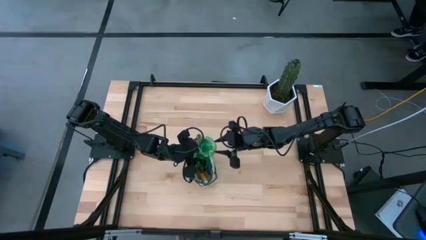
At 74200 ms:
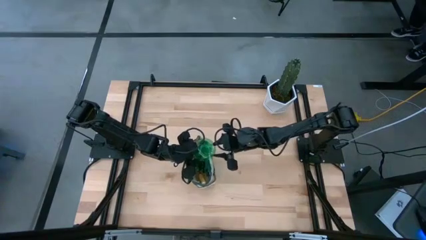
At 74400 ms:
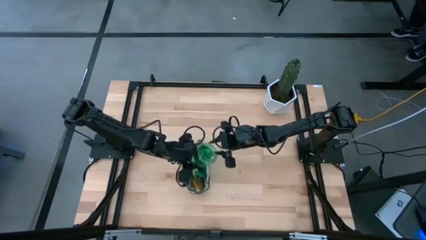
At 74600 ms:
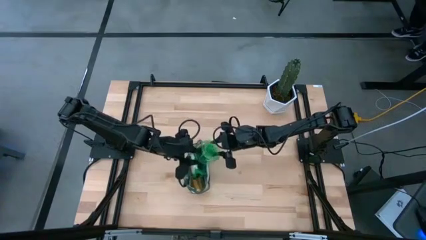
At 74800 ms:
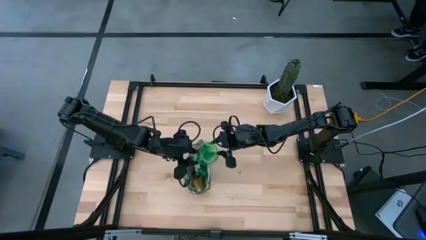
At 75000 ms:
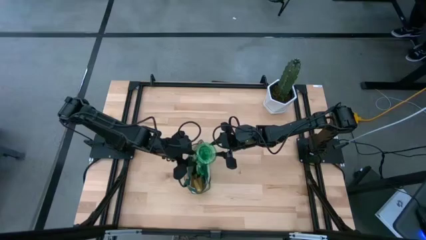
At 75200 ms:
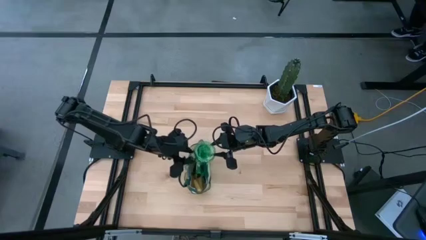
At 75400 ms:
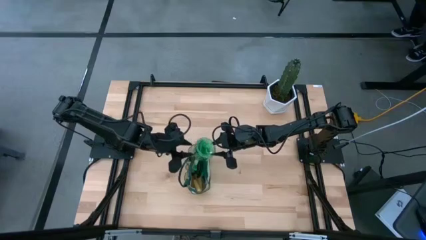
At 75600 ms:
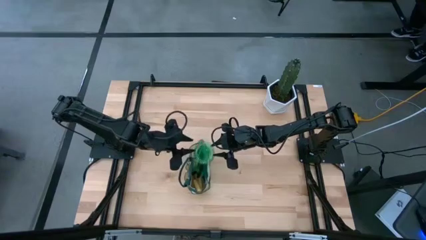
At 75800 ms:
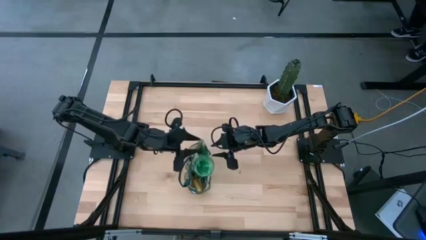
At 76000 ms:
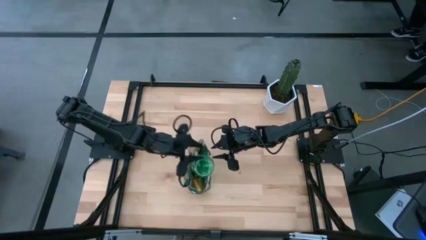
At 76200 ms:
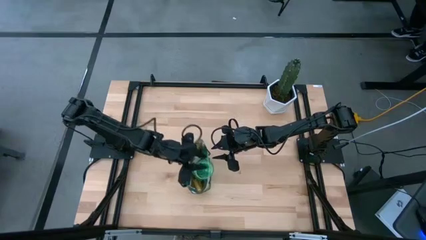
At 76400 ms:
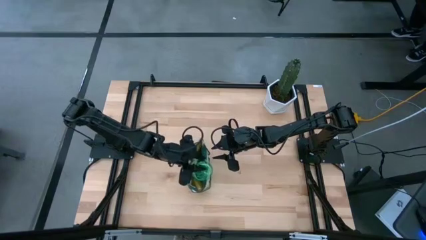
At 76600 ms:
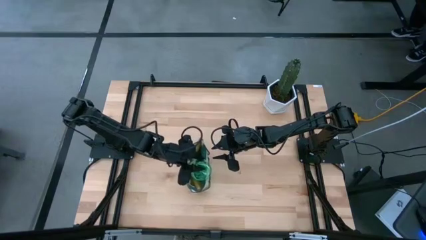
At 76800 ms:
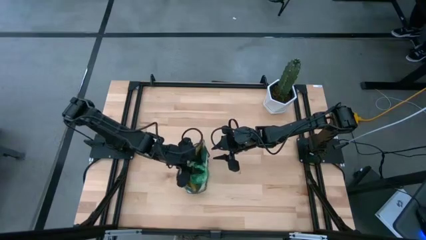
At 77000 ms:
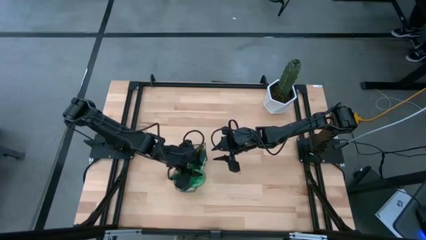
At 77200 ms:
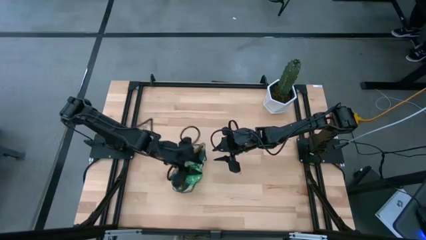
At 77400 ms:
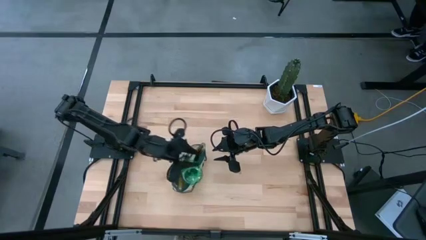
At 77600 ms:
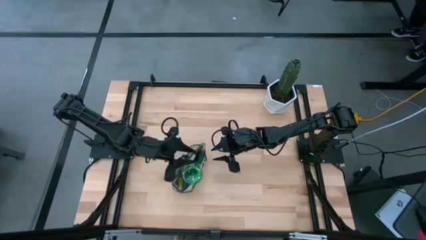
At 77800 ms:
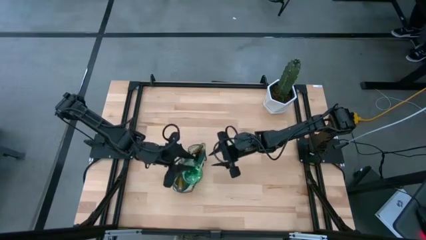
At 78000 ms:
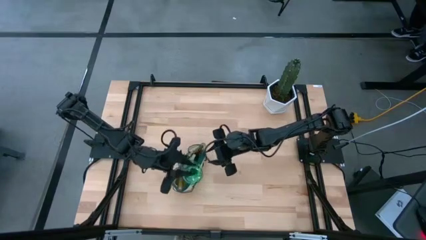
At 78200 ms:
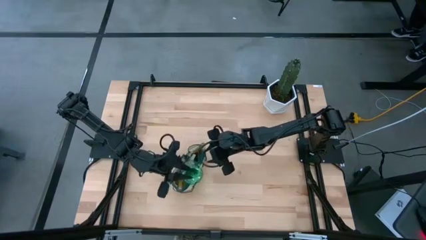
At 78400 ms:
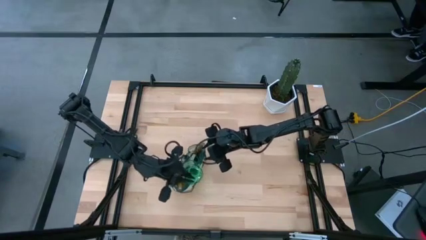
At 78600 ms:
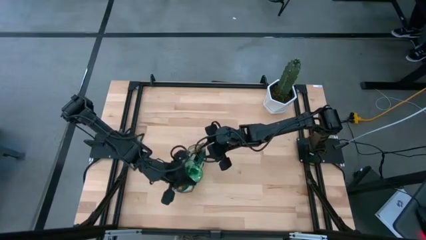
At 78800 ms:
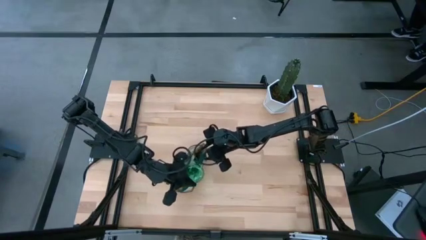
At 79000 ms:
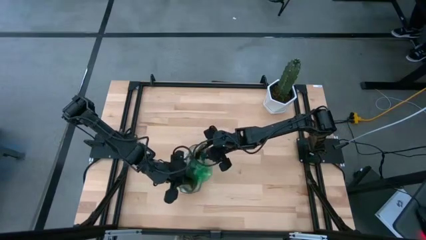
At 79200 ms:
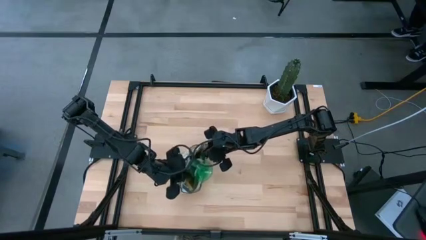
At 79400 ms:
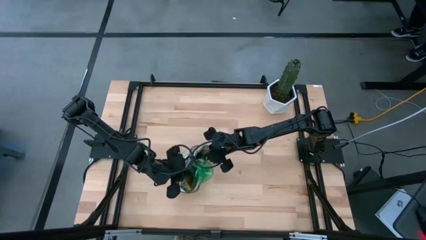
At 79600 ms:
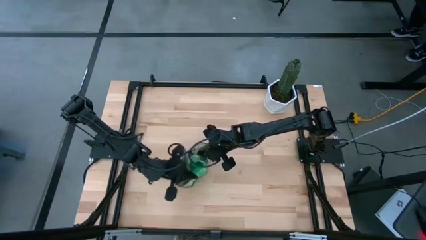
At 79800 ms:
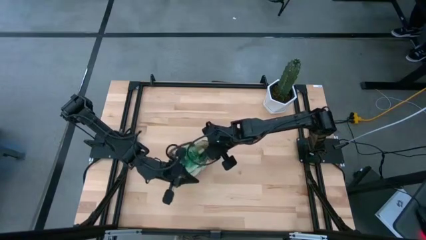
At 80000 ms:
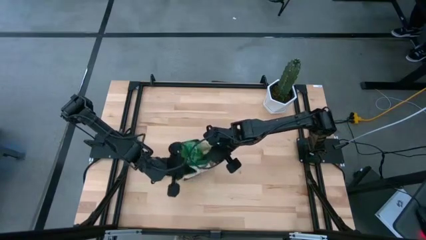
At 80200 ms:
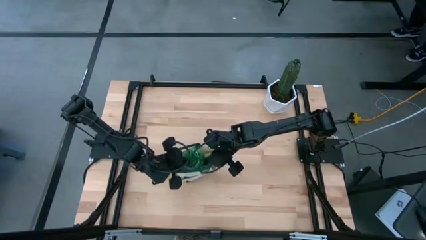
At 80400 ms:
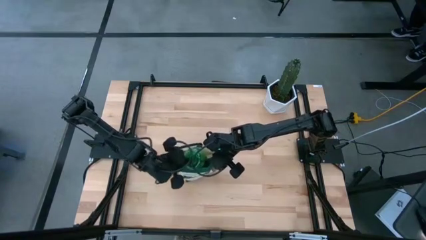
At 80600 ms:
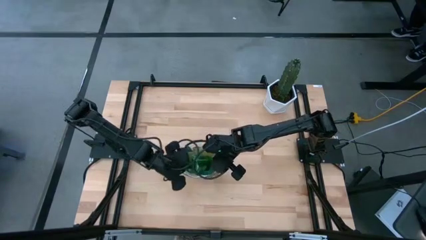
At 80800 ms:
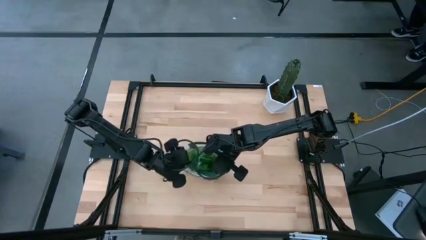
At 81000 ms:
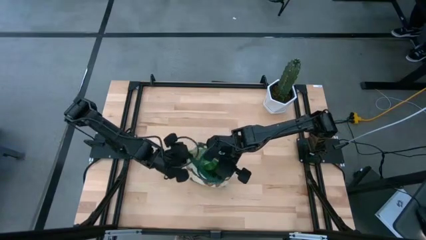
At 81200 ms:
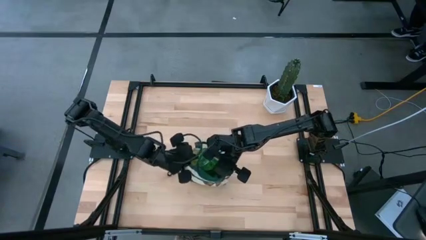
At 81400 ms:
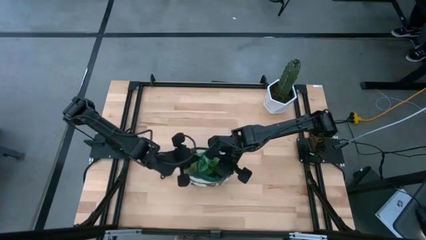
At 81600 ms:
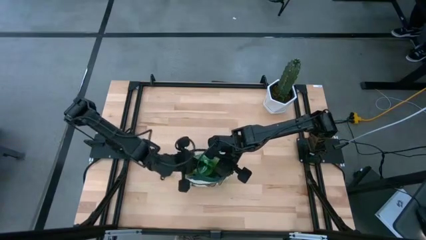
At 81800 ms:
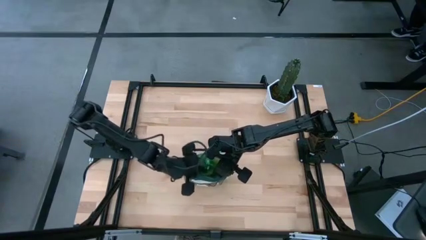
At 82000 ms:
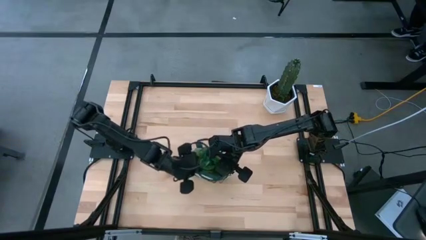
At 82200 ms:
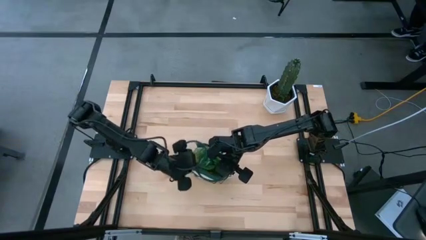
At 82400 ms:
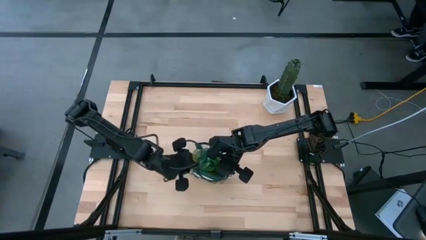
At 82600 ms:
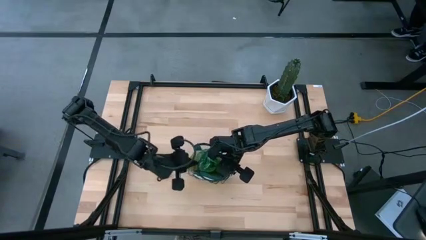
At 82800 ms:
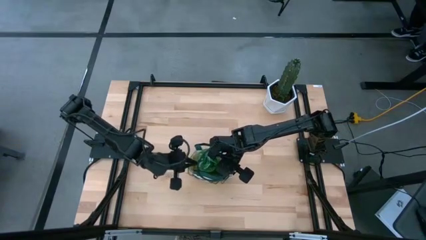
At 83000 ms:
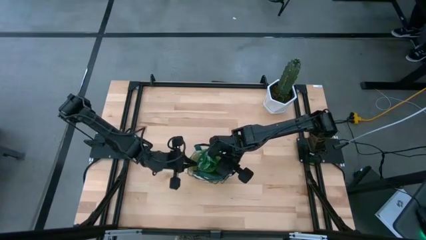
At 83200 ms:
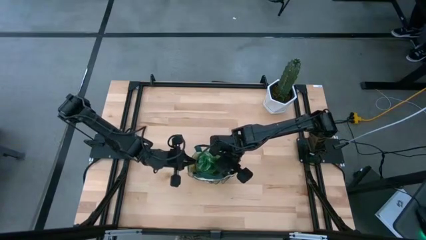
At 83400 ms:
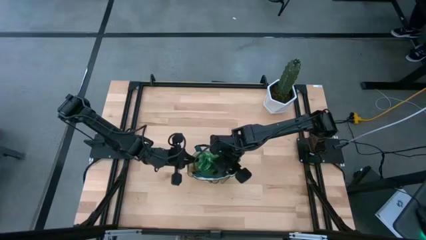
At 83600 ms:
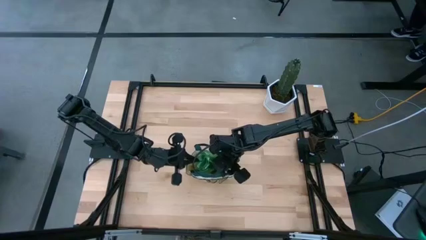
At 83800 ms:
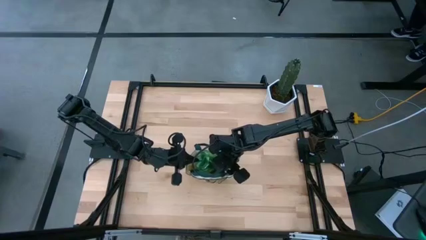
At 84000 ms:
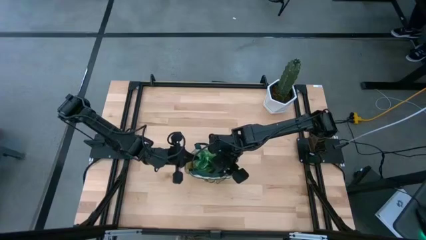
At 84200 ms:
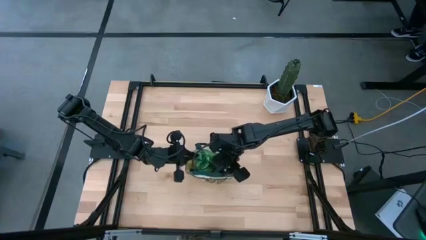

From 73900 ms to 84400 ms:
Task: Pick & Place Garden tools in Gardening bag
Put the green spray bottle into the gardening bag

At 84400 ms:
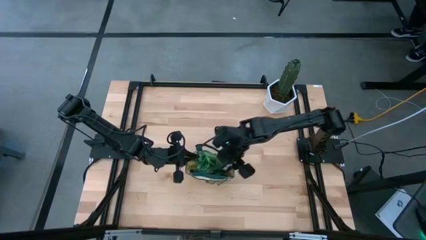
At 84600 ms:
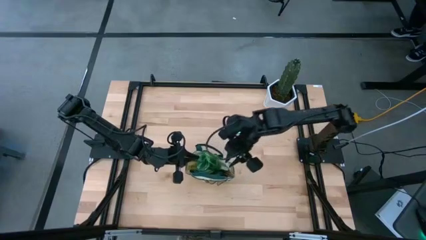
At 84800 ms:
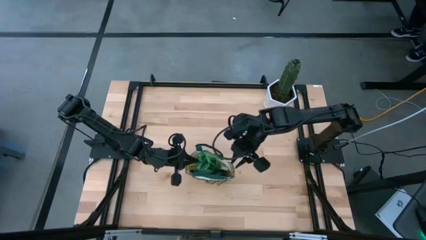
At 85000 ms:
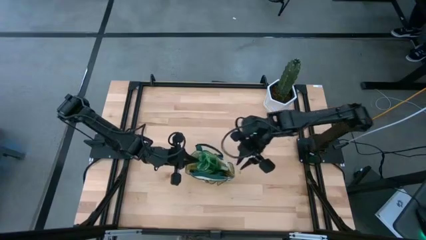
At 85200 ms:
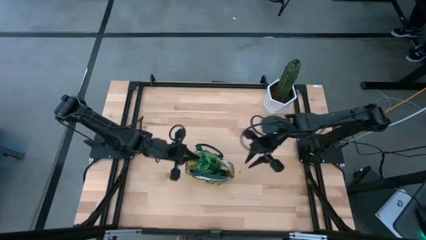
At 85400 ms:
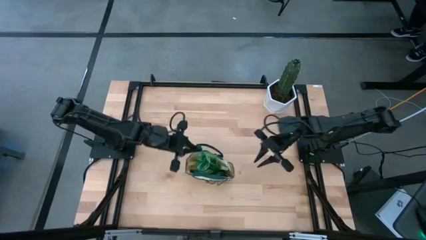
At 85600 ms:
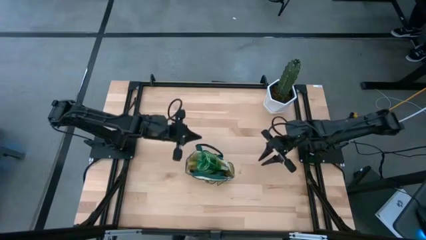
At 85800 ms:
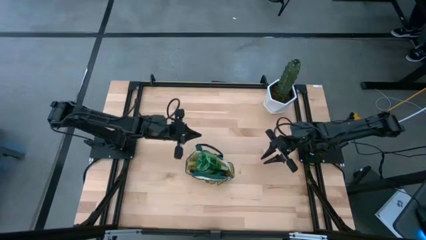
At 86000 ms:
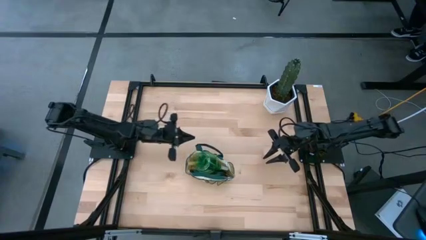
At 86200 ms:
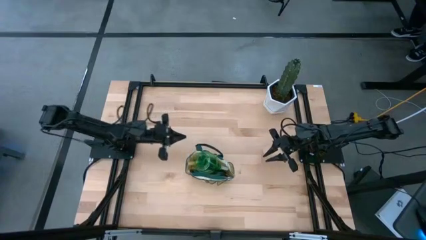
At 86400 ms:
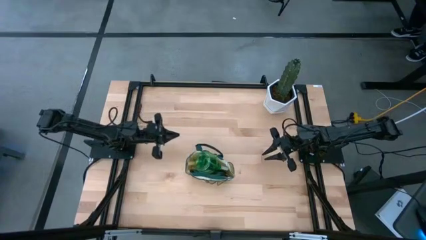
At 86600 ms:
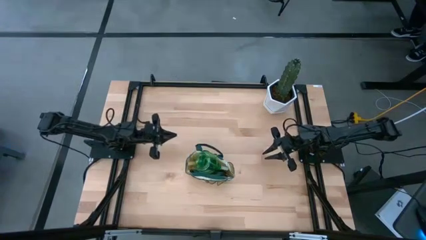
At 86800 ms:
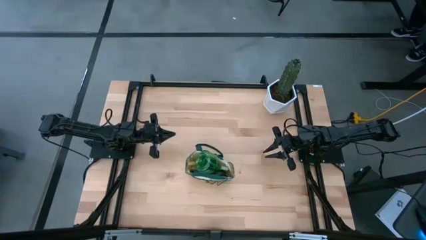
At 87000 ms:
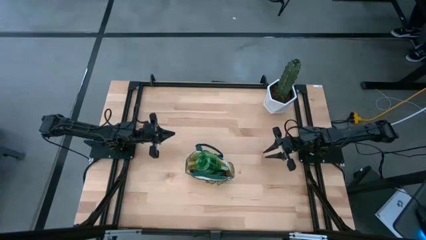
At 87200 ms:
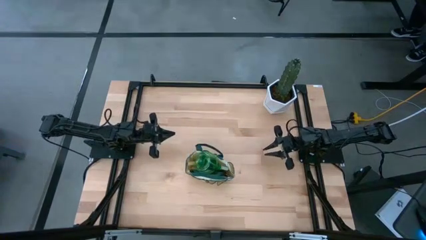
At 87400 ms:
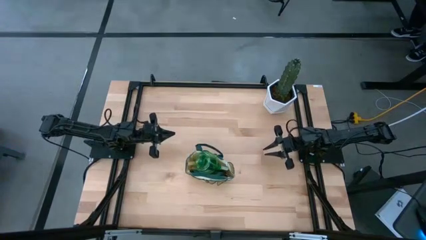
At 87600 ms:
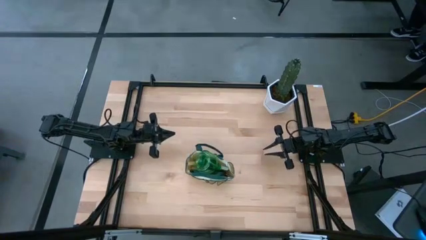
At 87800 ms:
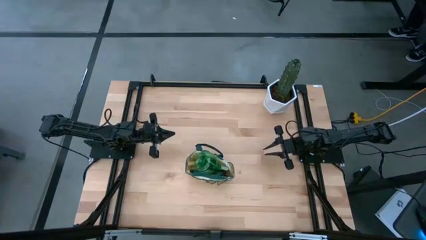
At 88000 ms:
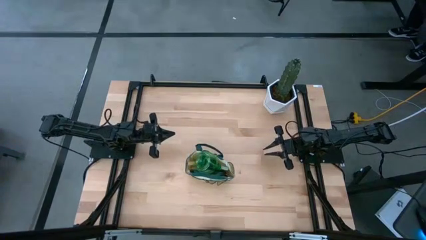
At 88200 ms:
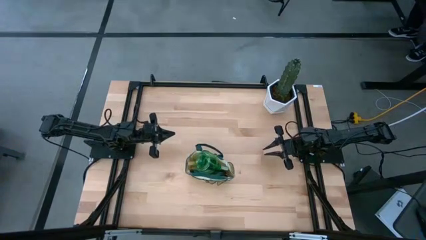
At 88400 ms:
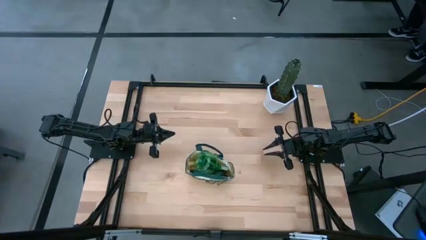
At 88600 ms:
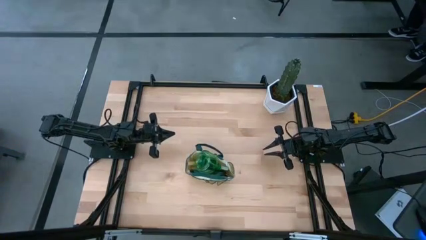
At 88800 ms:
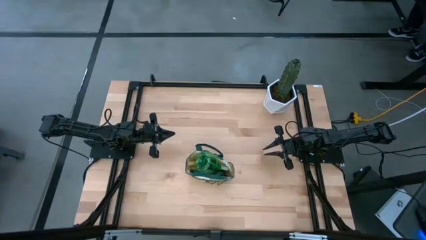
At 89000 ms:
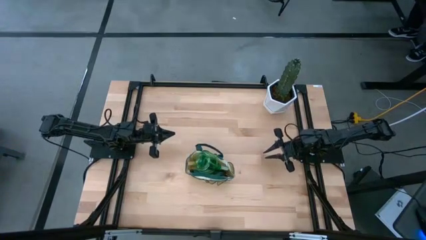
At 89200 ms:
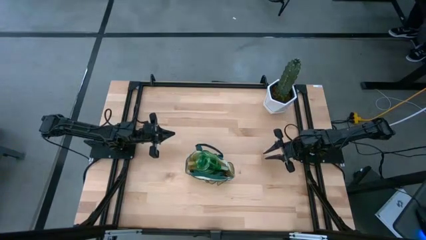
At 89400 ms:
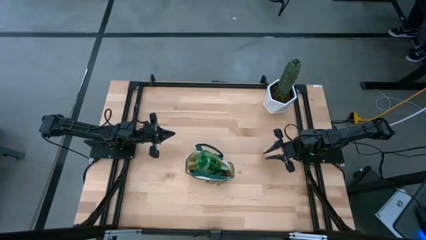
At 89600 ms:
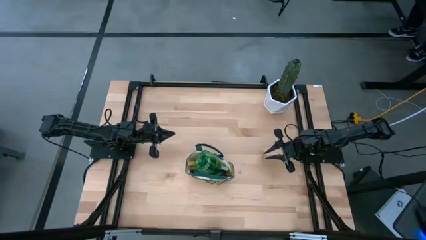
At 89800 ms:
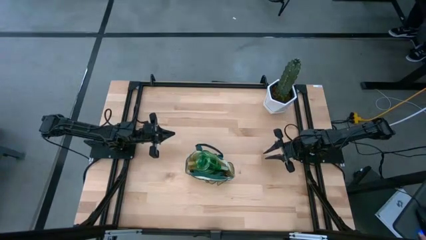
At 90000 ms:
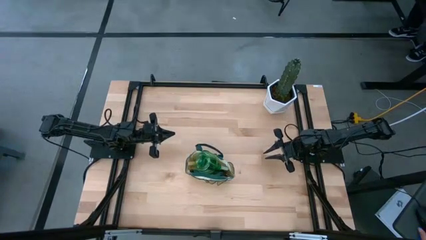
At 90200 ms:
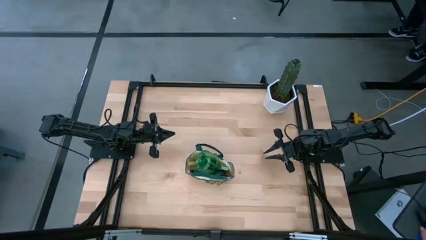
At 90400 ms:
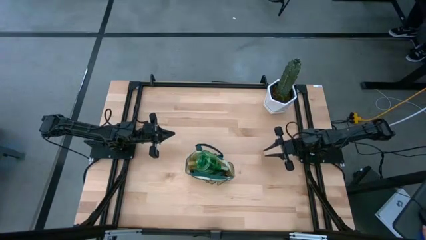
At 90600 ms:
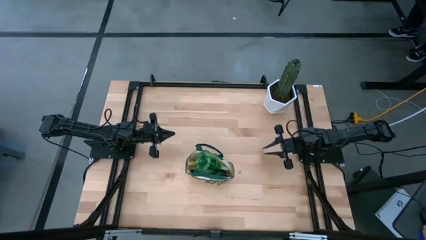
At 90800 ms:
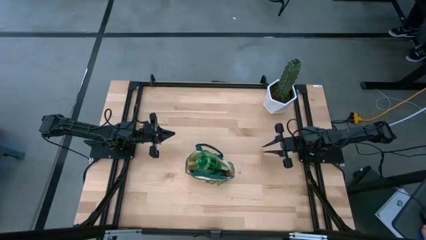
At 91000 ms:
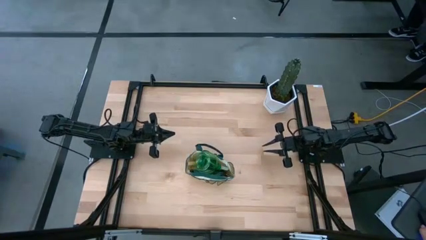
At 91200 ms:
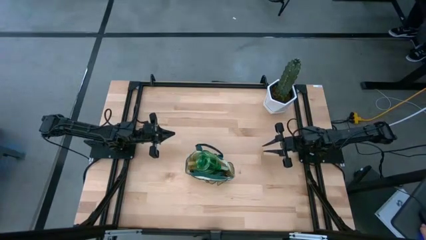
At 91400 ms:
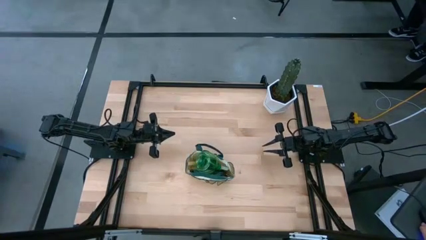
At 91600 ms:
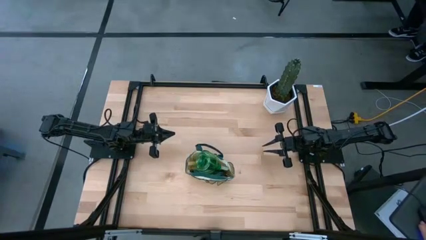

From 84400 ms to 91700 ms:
Return to Home Position
